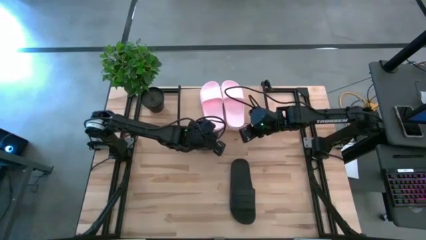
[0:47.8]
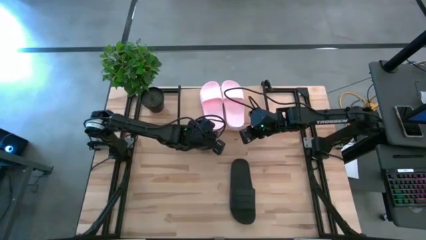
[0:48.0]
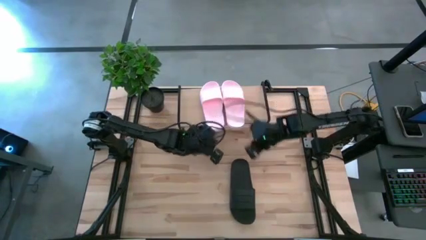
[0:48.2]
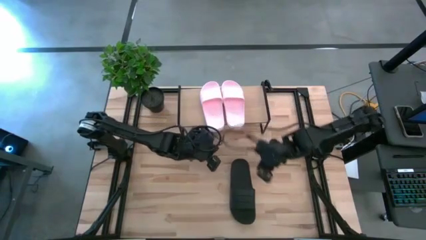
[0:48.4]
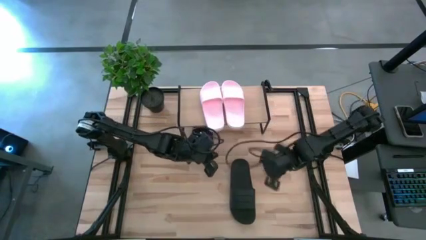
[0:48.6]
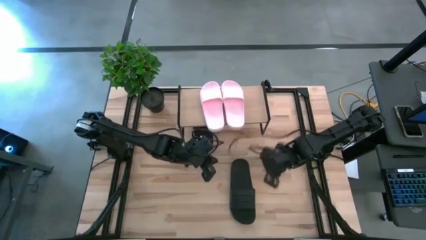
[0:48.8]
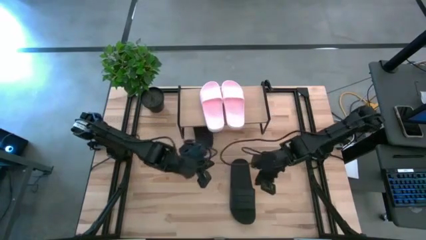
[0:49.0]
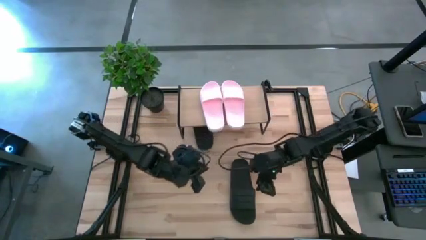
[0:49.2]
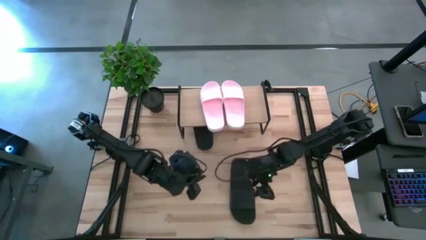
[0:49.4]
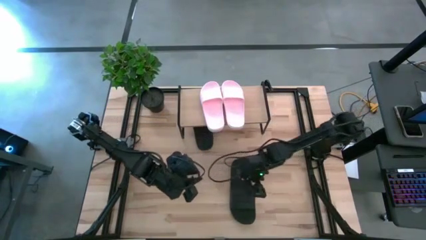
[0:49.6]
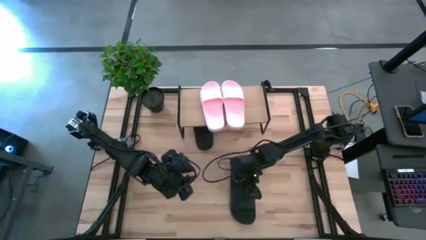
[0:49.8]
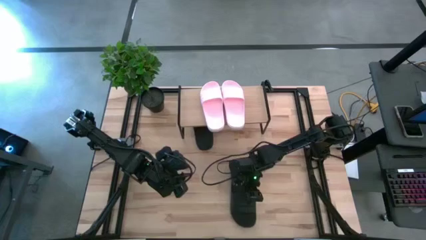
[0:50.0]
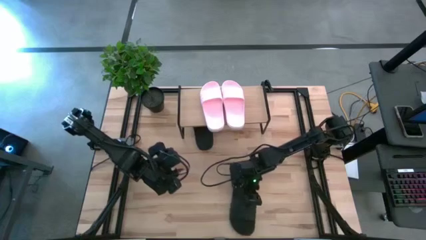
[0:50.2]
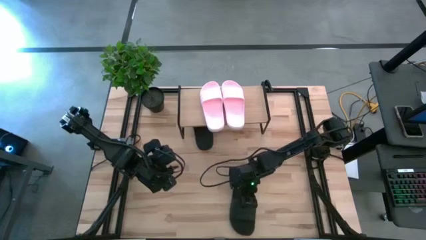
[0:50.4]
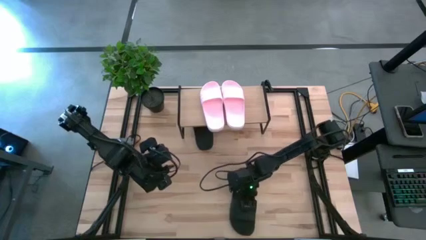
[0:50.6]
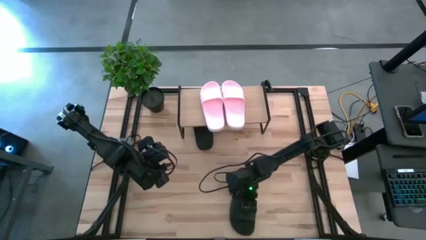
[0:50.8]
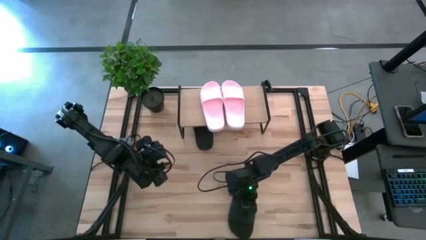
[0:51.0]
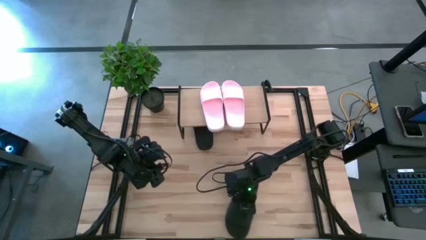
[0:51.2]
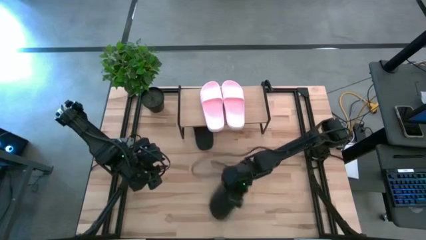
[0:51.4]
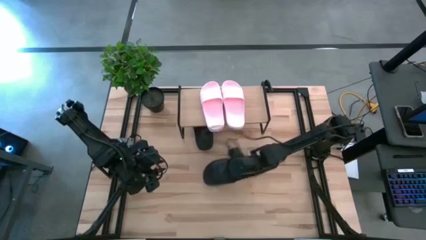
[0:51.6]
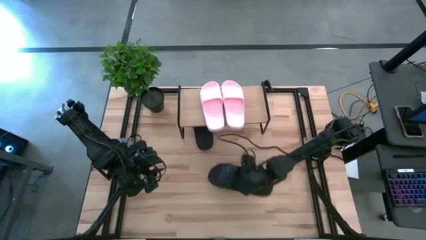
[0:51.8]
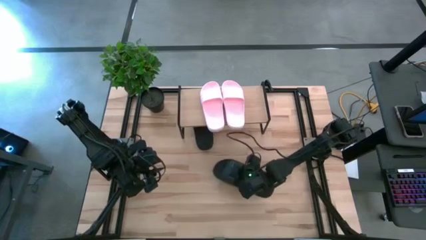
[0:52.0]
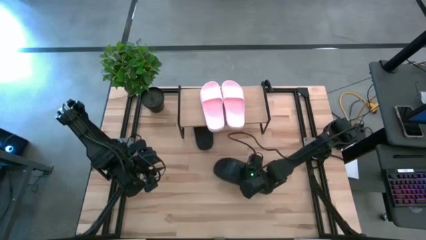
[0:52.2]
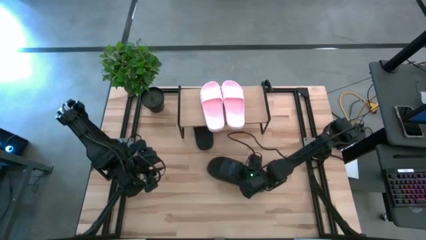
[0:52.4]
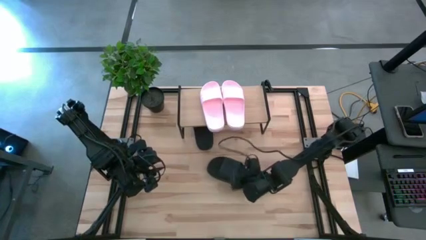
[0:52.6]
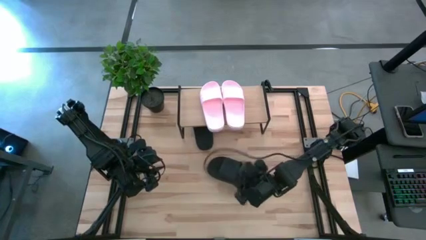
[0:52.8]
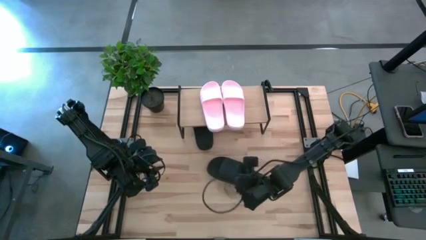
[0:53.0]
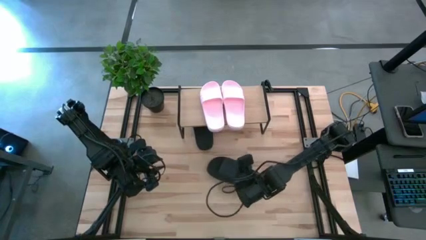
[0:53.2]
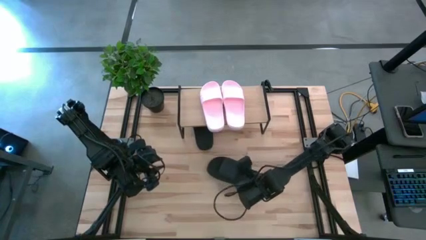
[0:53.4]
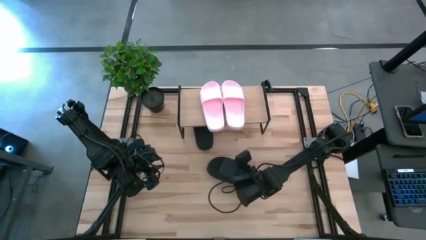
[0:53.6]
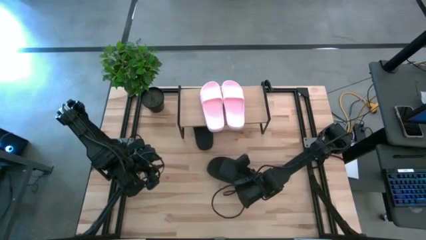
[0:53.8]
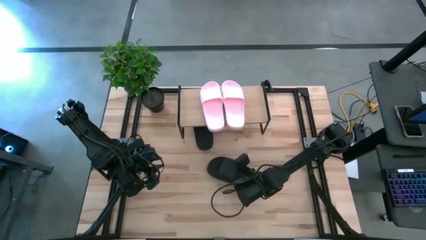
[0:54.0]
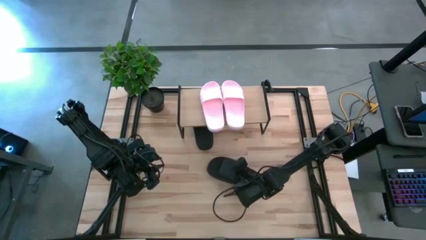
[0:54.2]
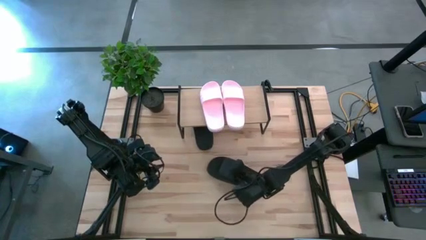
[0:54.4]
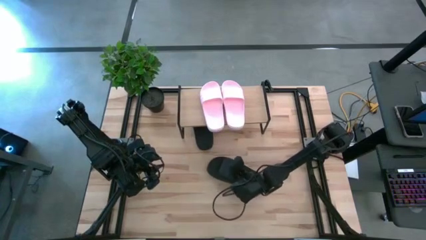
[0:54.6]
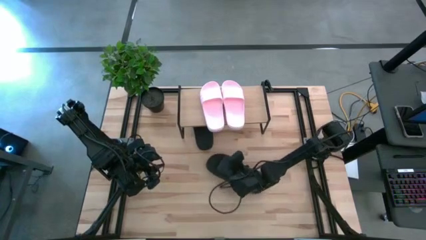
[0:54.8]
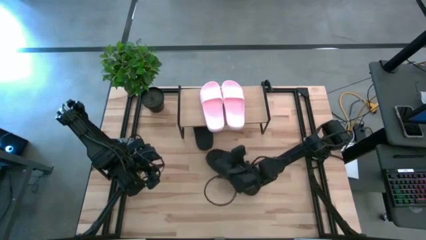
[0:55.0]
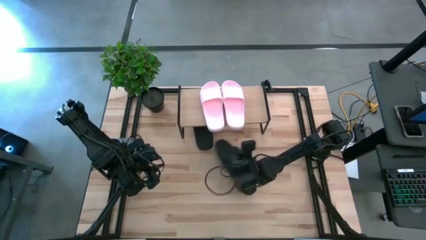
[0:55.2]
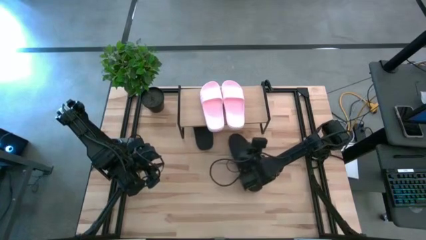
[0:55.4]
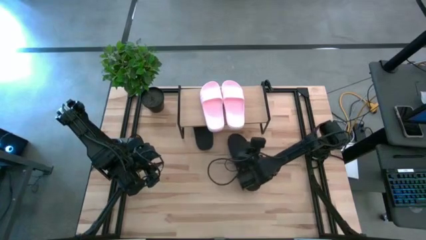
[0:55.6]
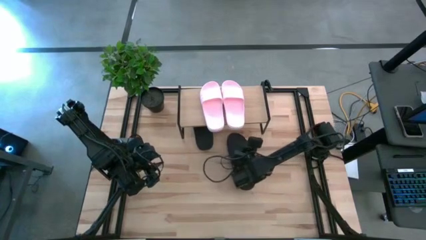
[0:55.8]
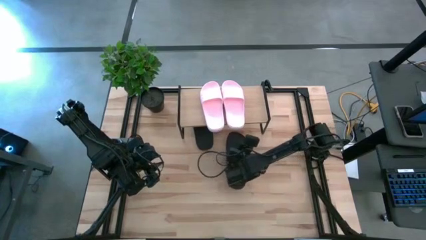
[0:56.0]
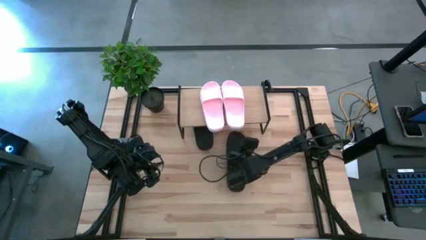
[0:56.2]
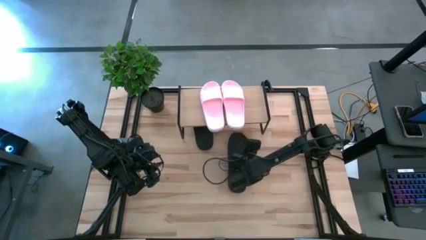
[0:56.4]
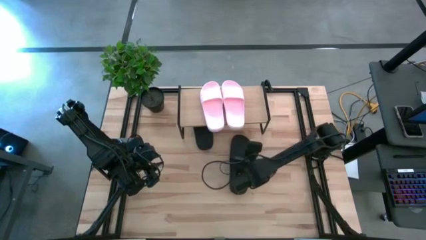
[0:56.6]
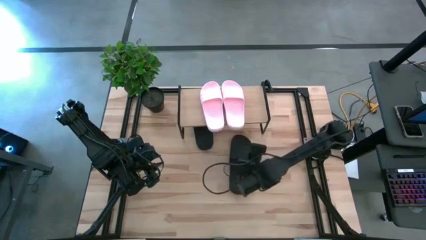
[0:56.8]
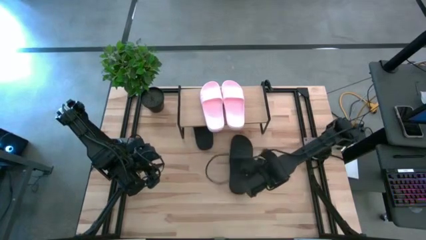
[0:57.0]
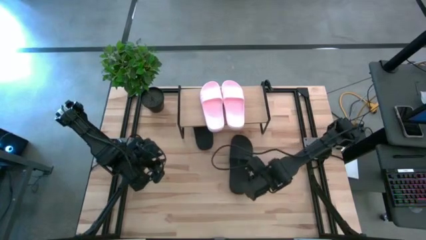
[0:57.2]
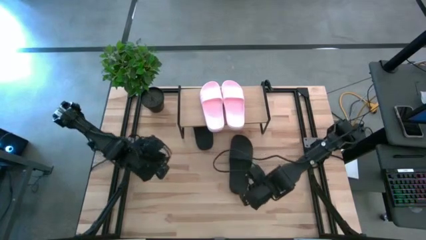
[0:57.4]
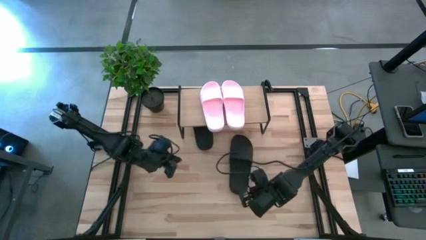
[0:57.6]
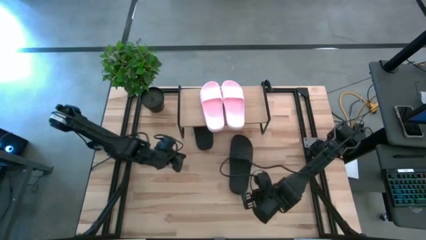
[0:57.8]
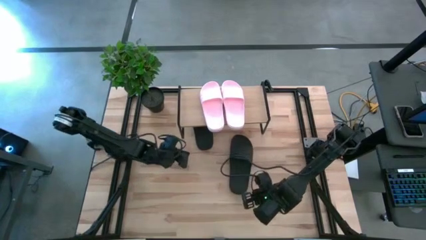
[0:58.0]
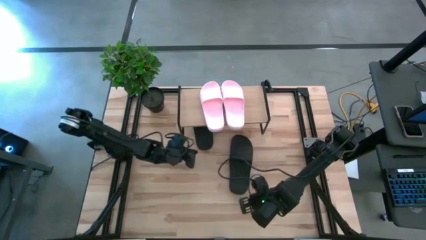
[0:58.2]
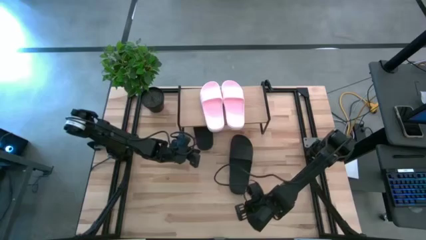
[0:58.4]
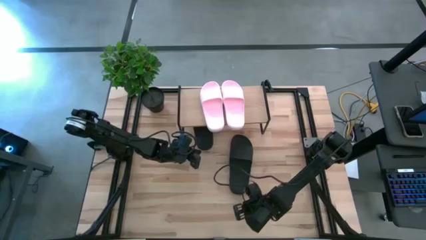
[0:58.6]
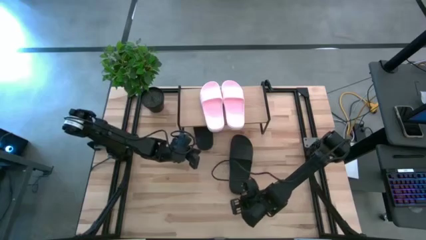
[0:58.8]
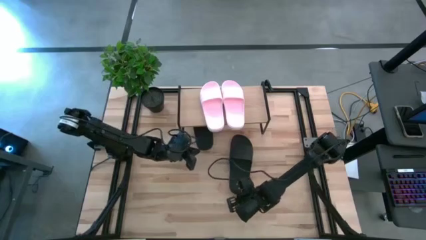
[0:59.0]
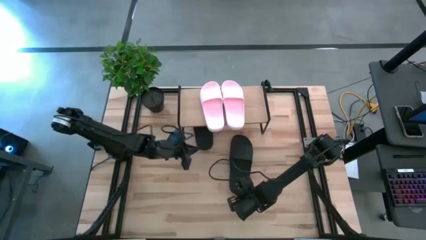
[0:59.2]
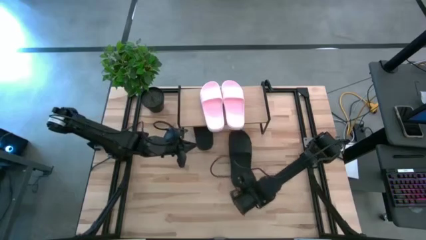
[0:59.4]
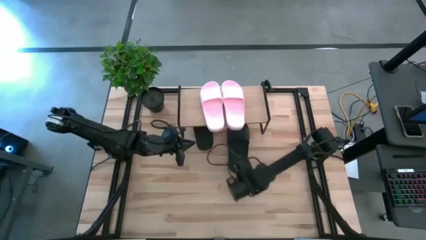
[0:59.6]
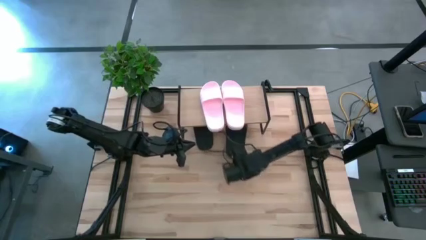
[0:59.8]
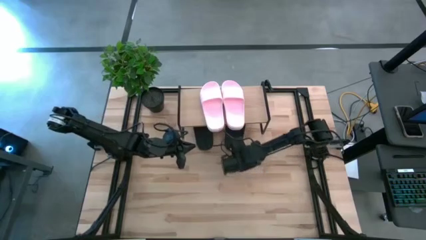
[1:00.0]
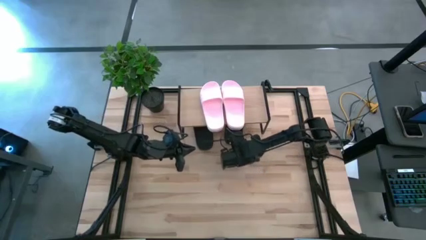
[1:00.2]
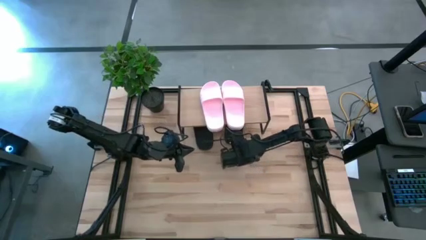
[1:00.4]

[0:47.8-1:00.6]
Task: Pick and place slides into the shelf
Put the black slipper under the shelf

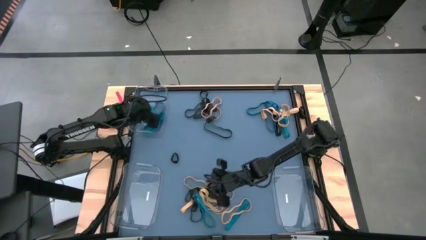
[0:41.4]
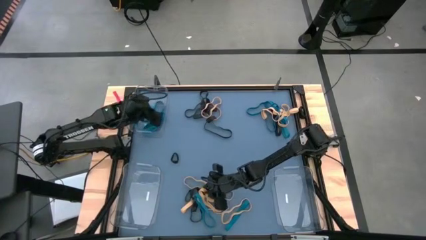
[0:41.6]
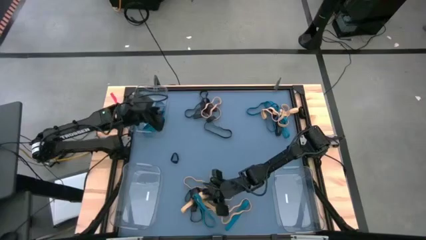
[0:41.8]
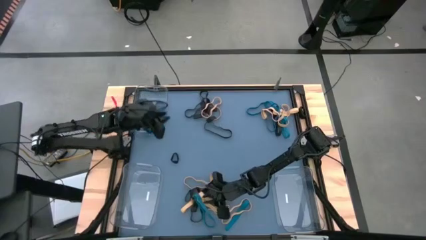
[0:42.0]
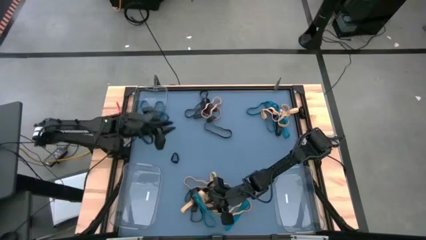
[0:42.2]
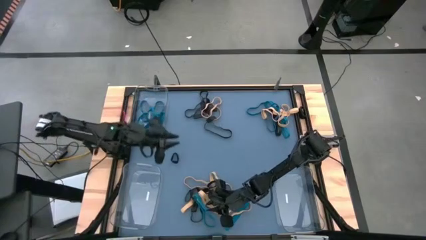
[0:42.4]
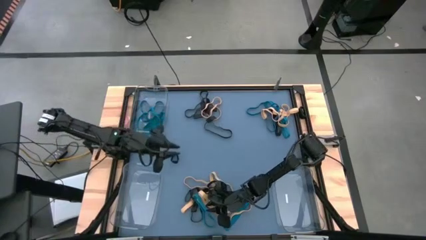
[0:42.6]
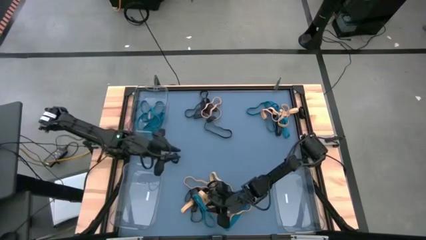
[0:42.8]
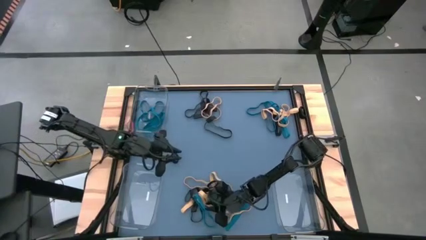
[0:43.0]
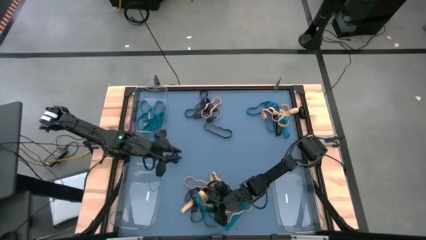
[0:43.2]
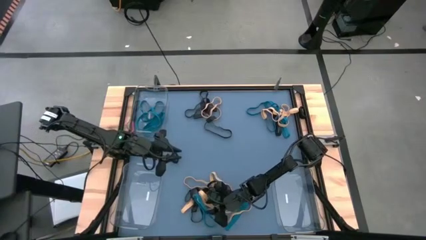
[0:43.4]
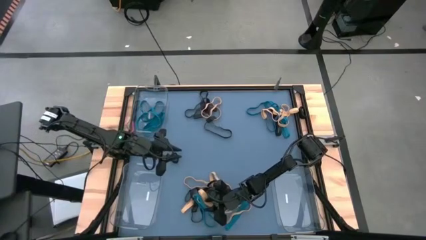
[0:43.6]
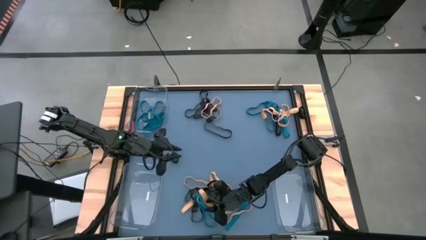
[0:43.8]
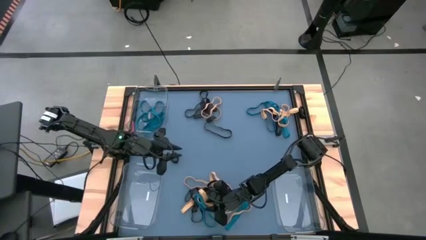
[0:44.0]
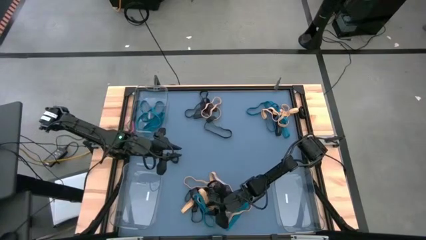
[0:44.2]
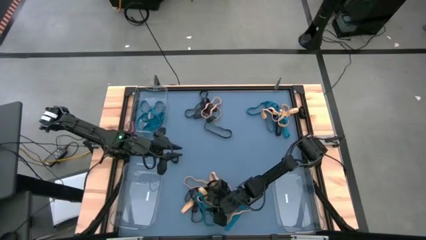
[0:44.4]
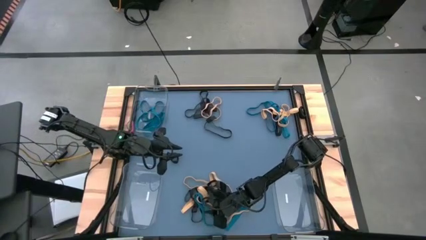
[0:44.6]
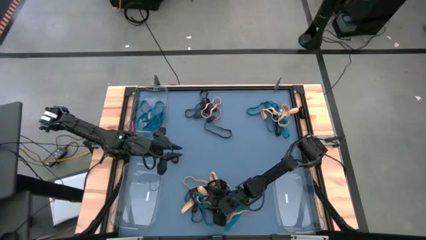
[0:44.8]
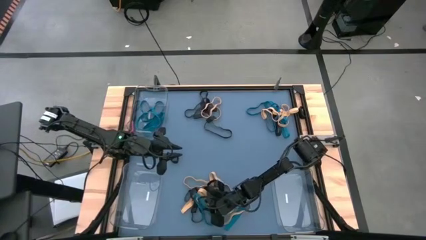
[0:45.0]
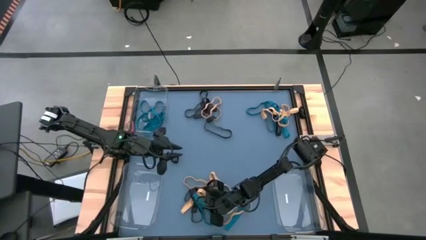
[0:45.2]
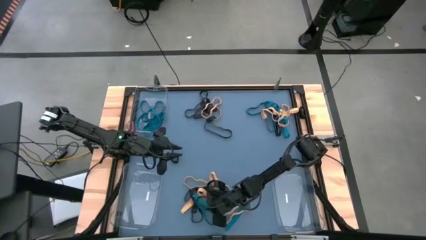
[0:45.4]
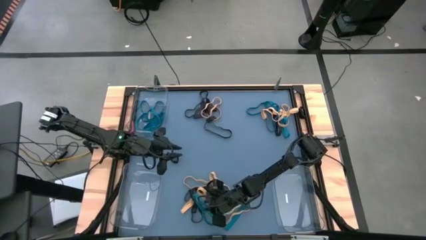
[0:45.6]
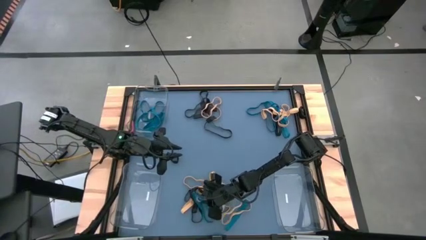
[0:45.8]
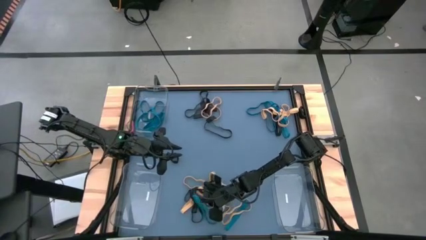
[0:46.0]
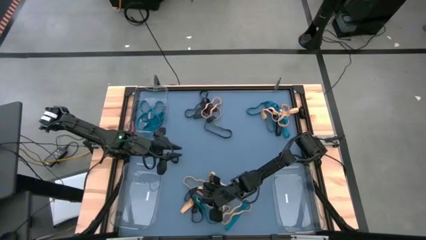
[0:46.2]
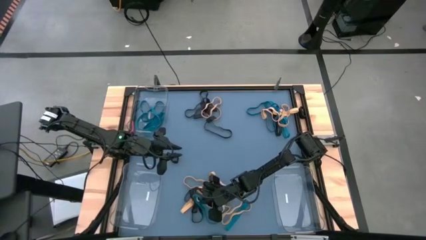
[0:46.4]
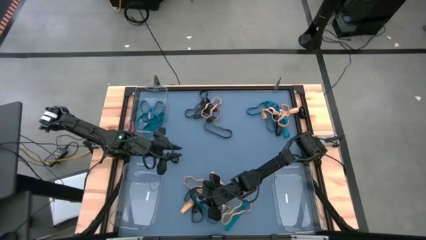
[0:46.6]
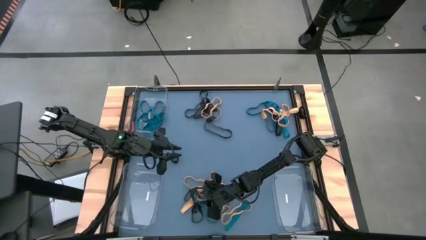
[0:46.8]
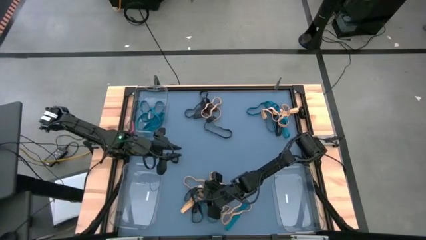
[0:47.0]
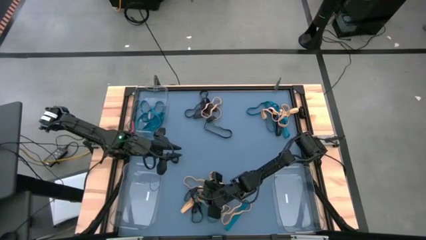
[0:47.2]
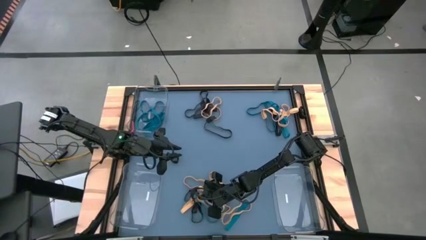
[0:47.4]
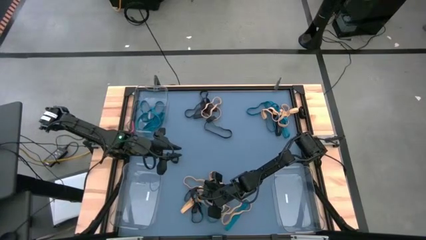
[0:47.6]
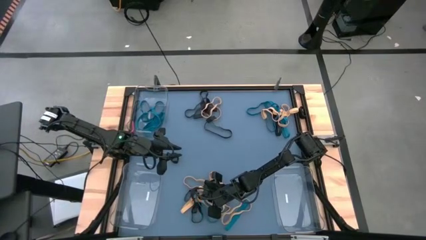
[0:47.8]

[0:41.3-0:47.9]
Task: Sort rubber bands into baskets
Put the blue rubber band into the top transparent bin
